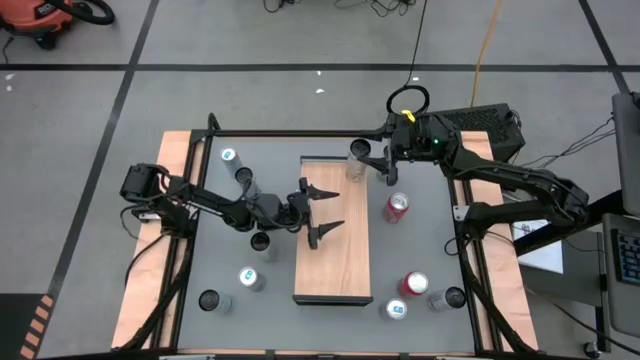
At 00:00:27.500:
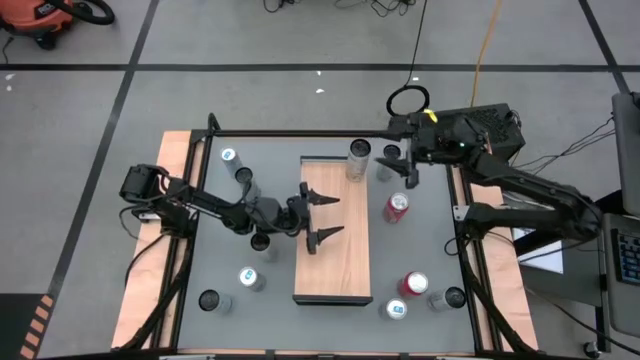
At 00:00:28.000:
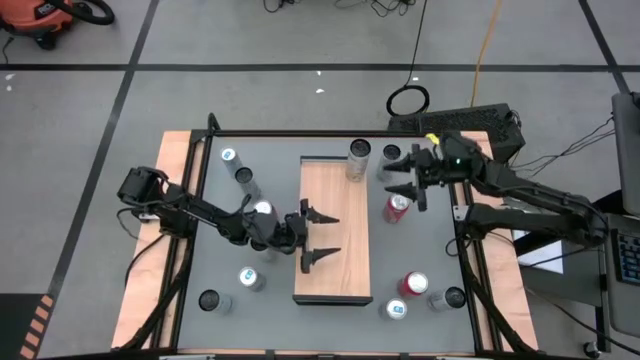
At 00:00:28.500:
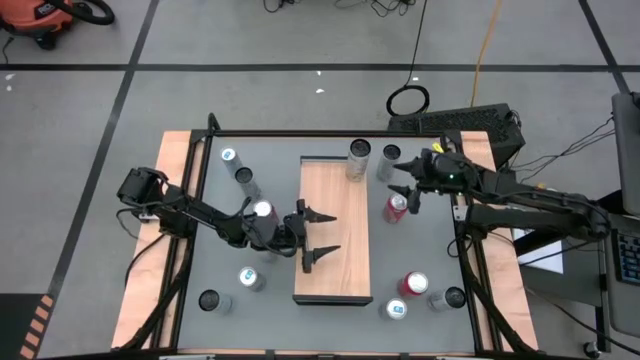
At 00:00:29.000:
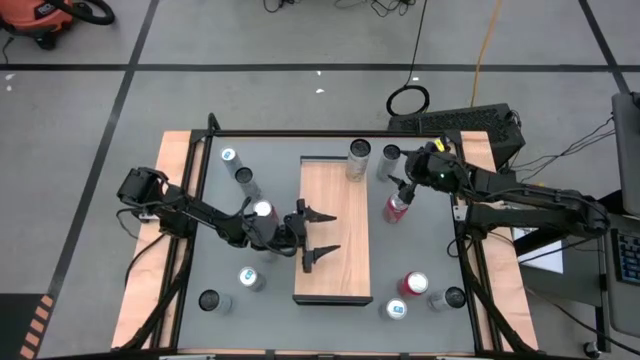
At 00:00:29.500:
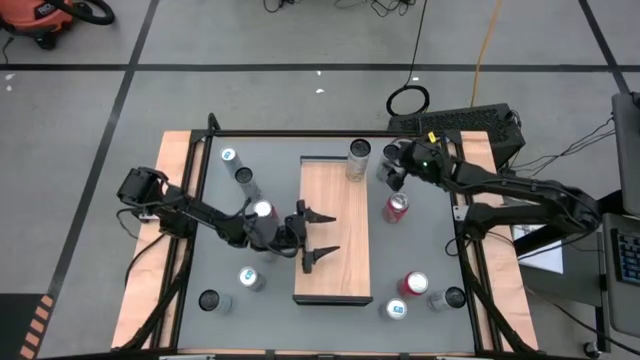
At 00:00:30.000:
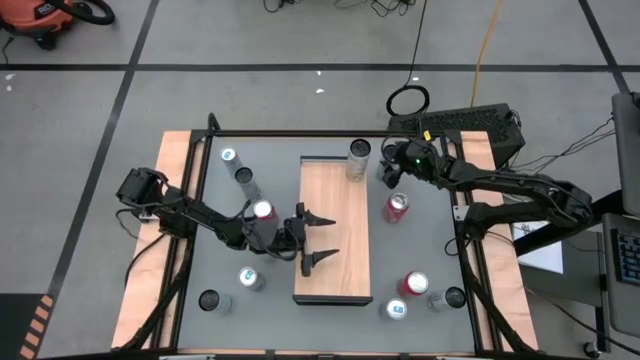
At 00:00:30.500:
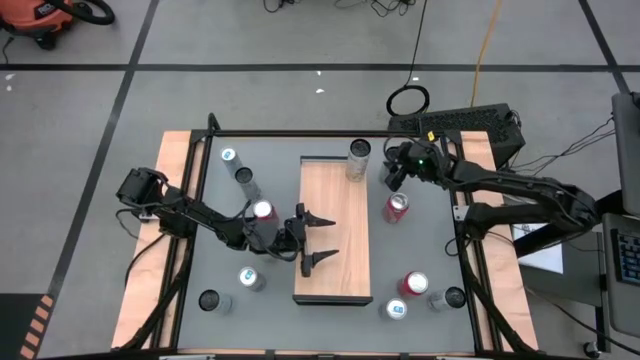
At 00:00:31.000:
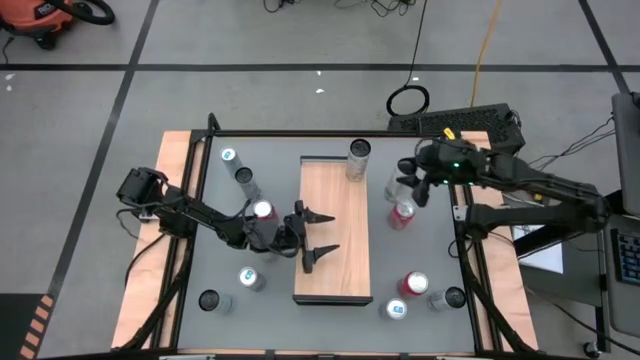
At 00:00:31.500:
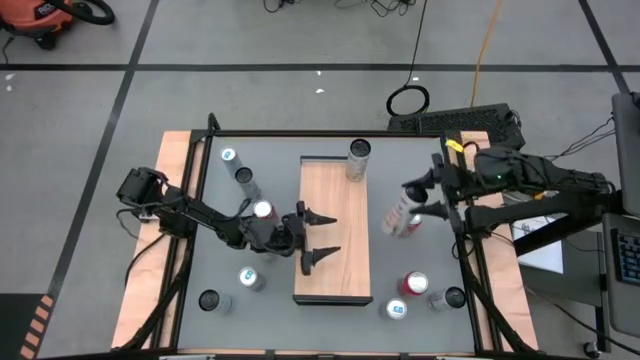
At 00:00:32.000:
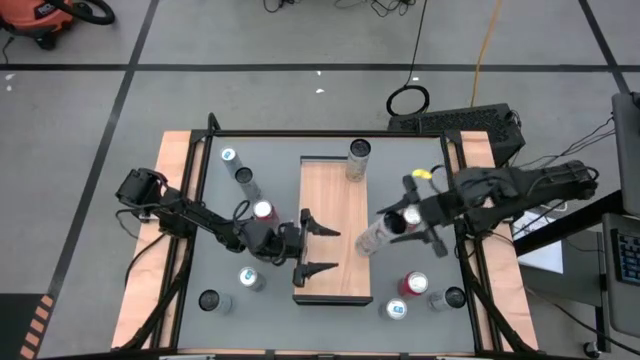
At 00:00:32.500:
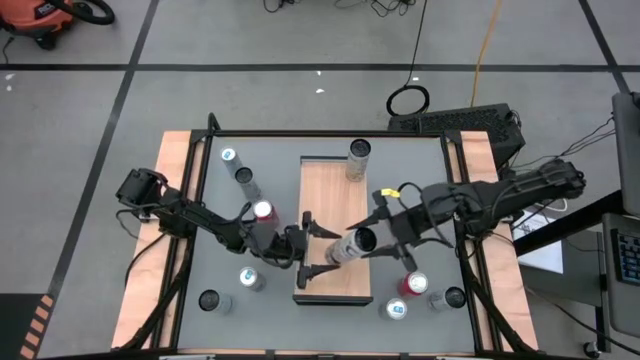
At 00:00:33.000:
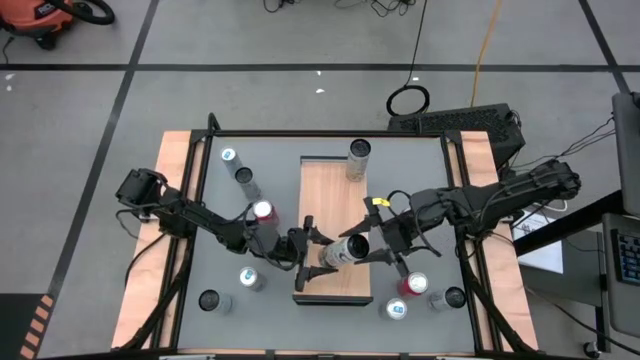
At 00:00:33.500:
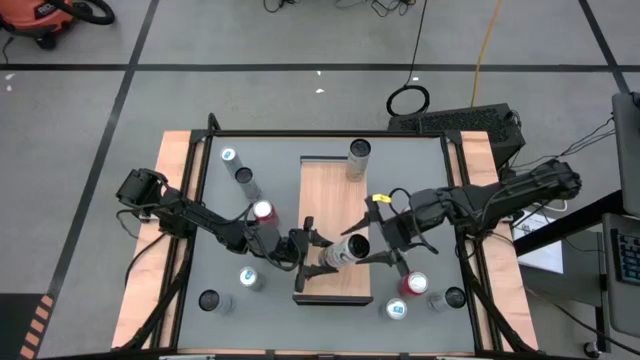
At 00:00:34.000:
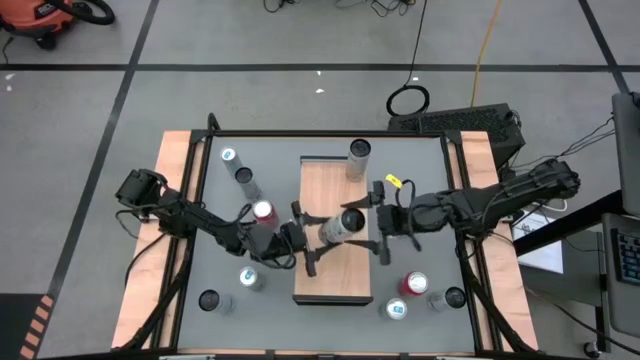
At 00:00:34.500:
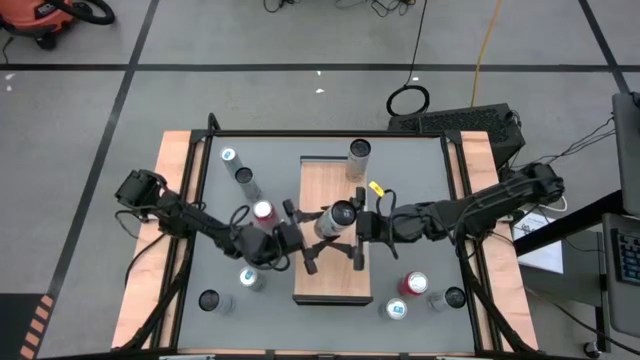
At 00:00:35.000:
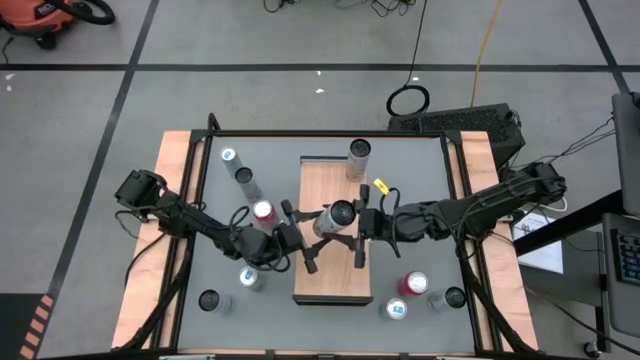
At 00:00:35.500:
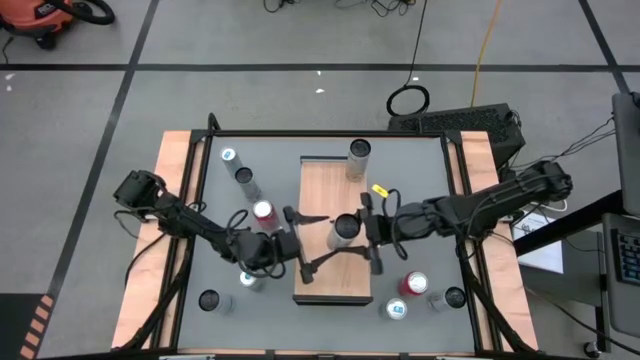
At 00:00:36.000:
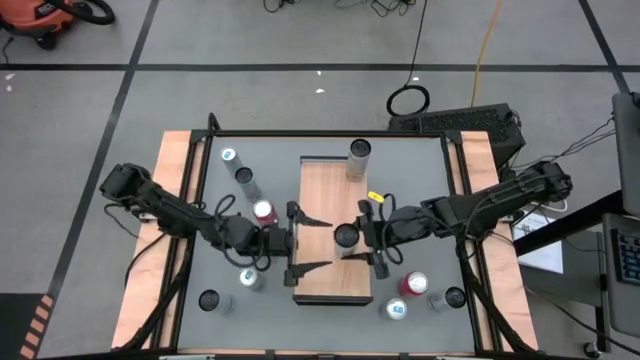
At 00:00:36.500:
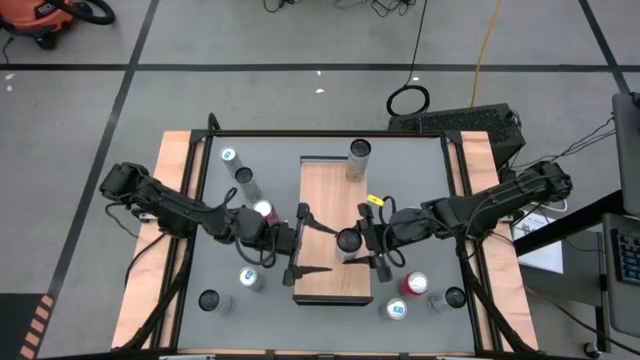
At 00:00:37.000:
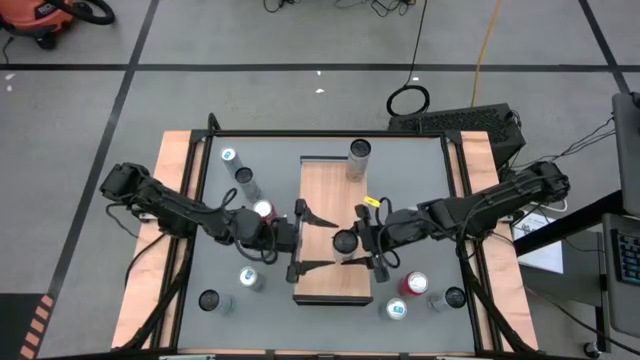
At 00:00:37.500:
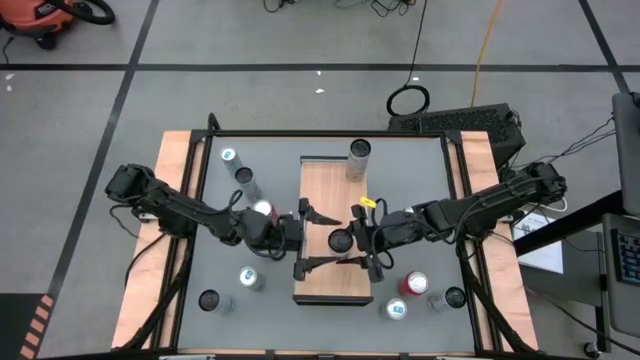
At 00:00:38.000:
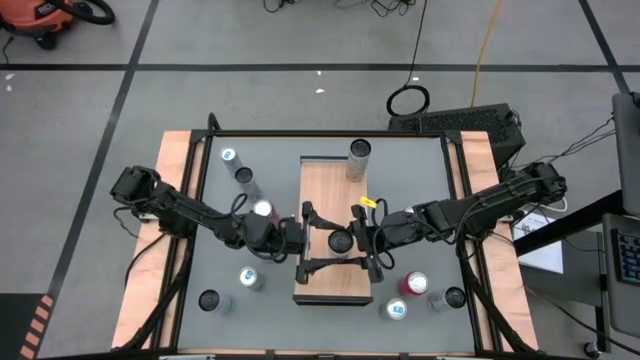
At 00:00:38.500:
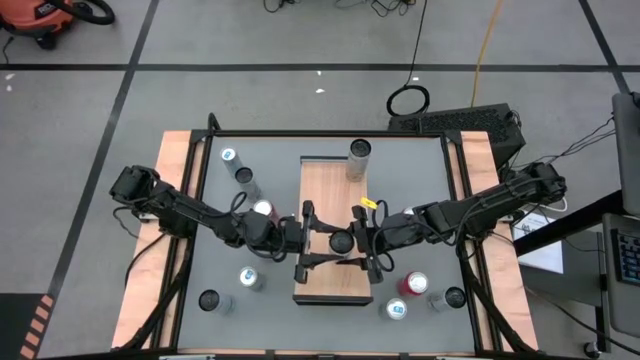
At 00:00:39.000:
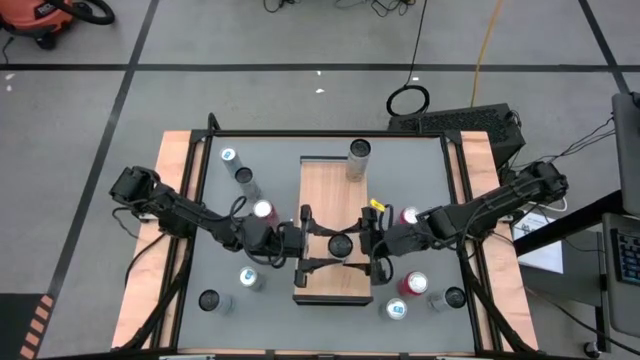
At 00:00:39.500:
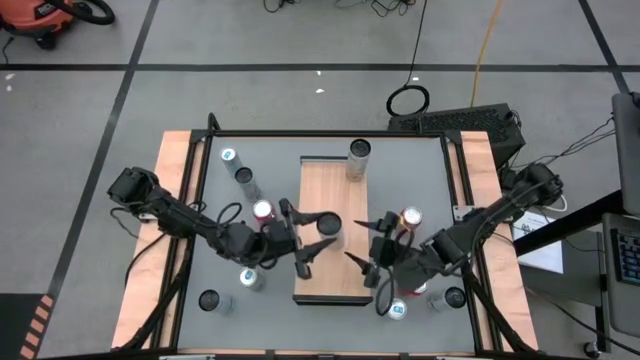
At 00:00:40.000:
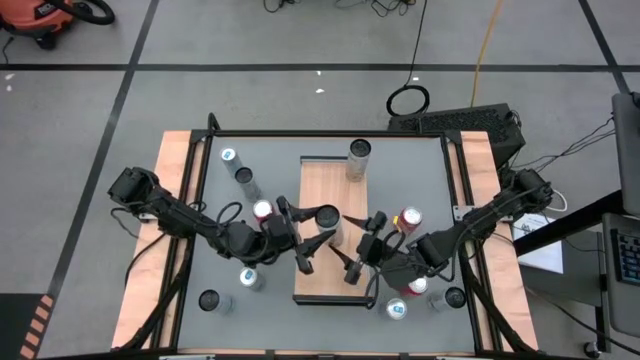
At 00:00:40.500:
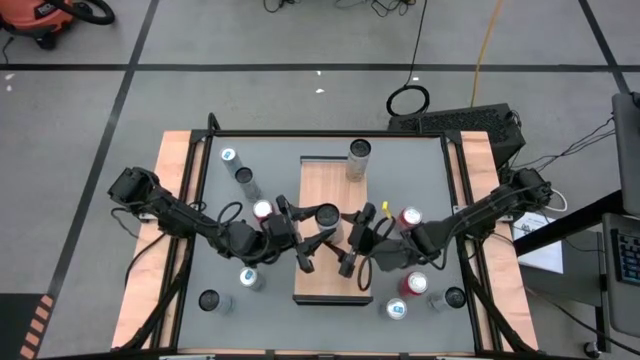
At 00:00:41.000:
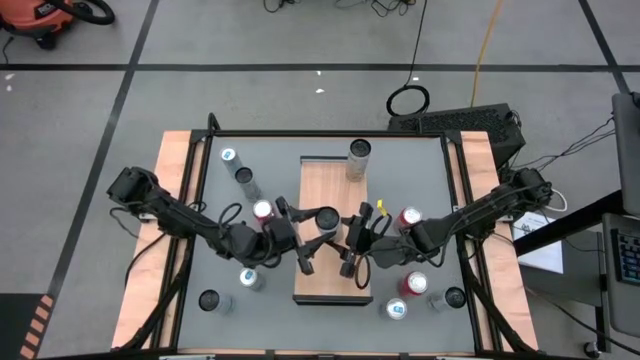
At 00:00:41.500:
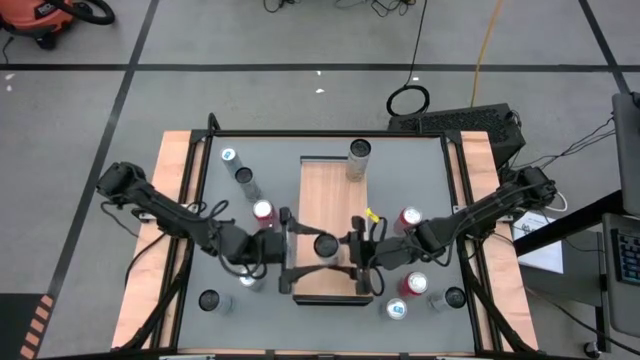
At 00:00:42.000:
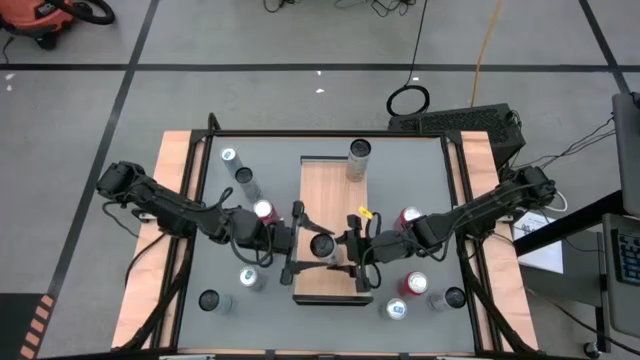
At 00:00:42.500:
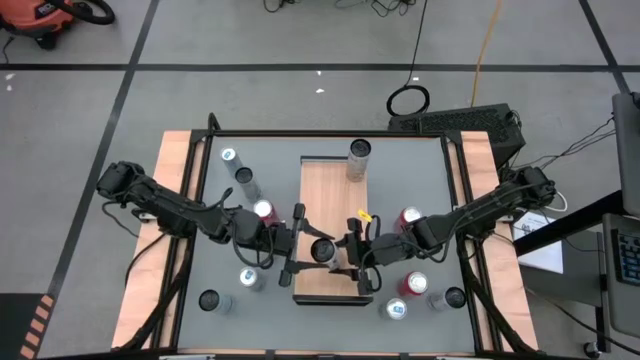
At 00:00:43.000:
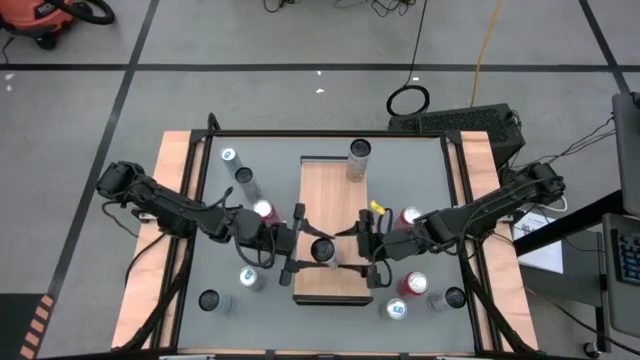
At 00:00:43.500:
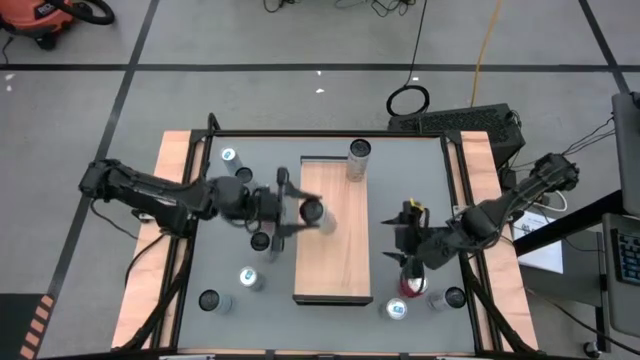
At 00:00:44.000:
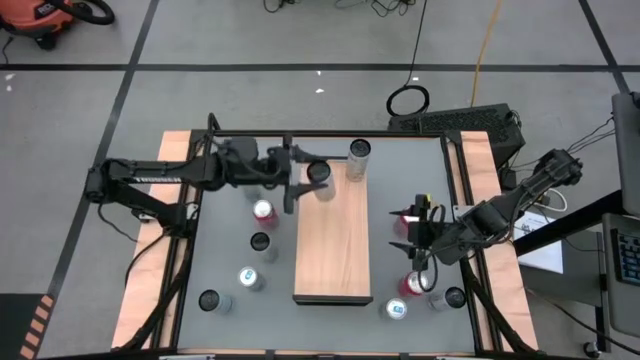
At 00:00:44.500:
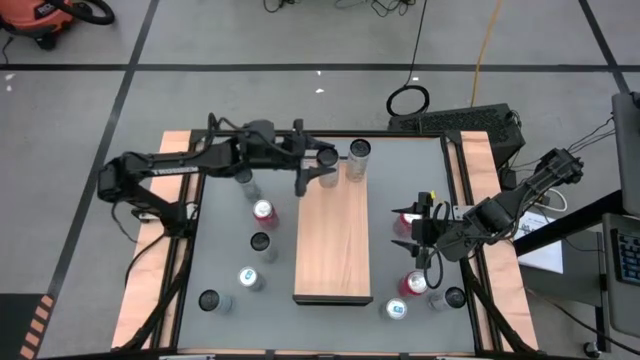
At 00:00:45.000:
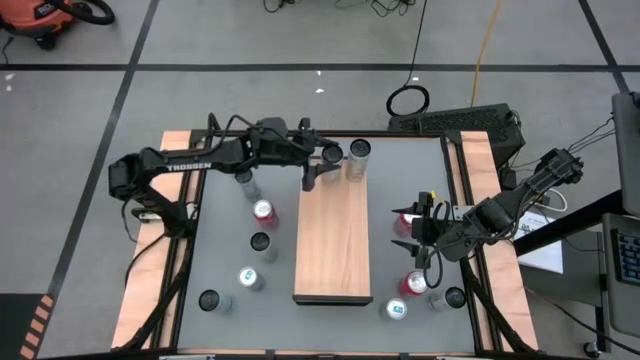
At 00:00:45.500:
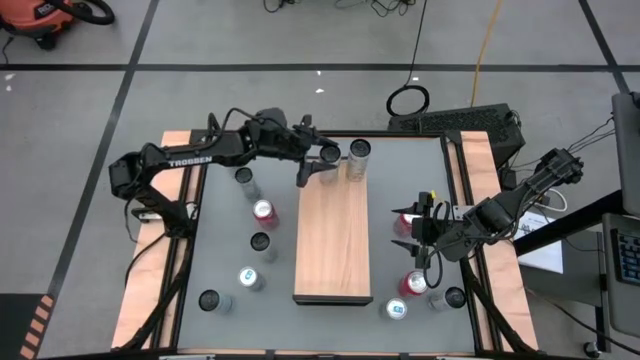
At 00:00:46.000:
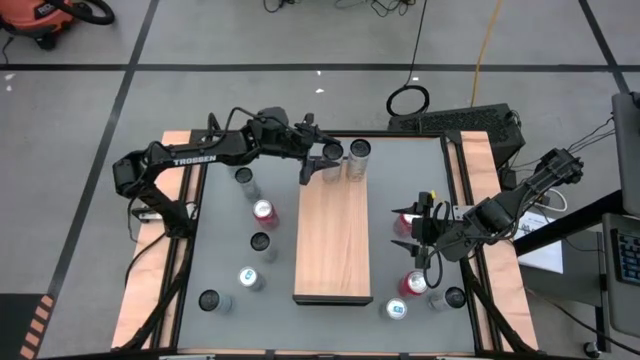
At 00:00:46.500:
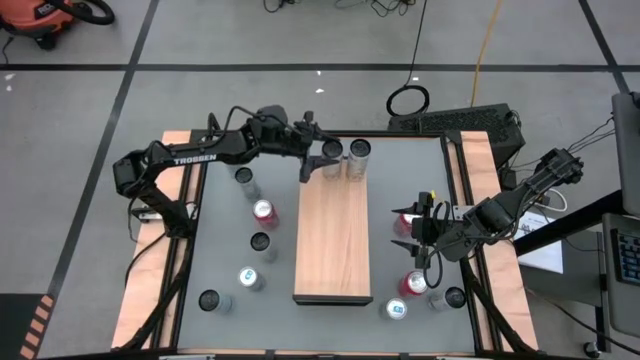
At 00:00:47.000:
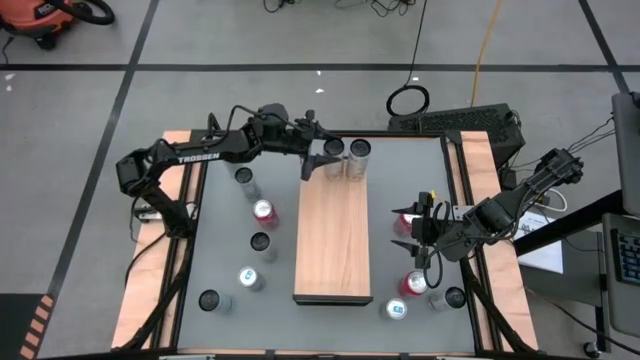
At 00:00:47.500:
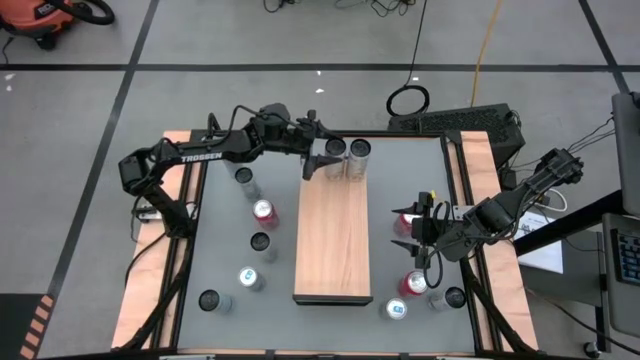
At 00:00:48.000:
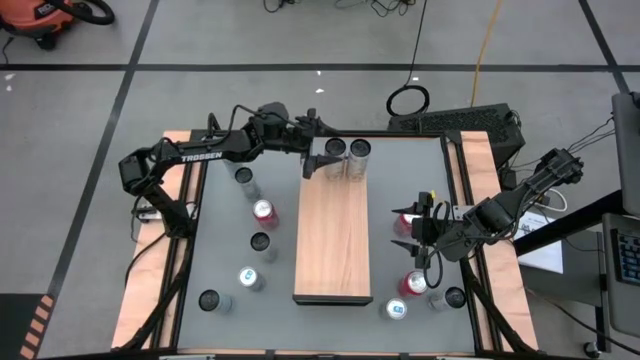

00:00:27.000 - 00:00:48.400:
Task: Place canned beverage on shelf
Put the right white yellow soda can on the shelf aligned with the other white yellow soda can
